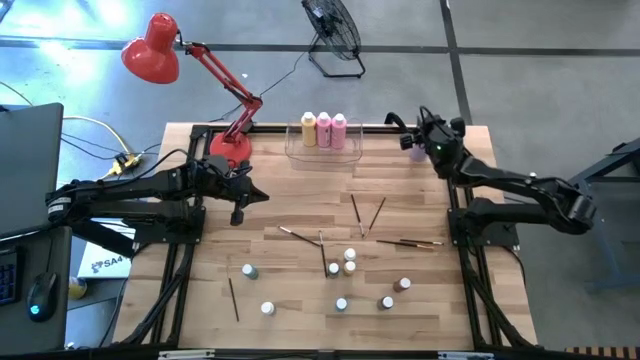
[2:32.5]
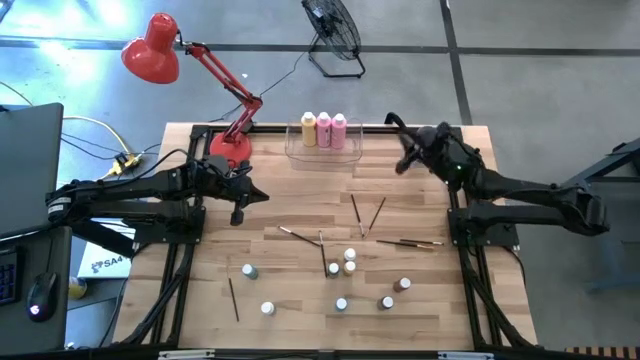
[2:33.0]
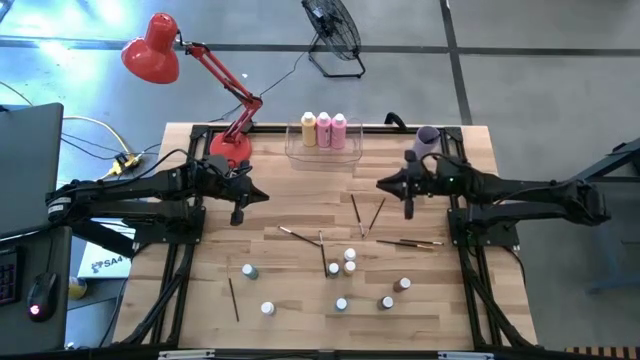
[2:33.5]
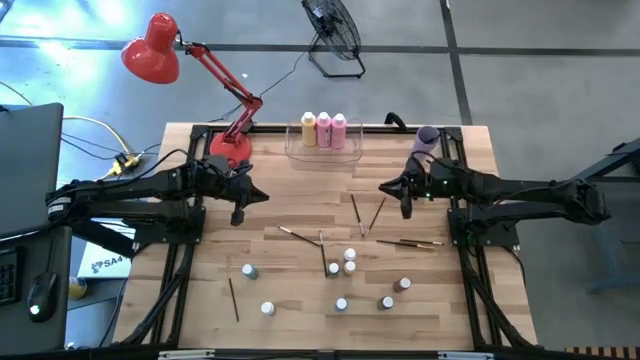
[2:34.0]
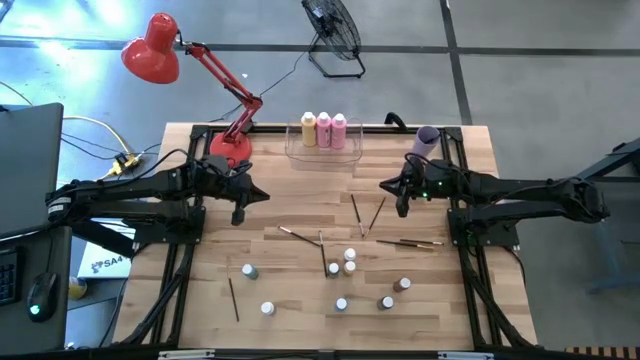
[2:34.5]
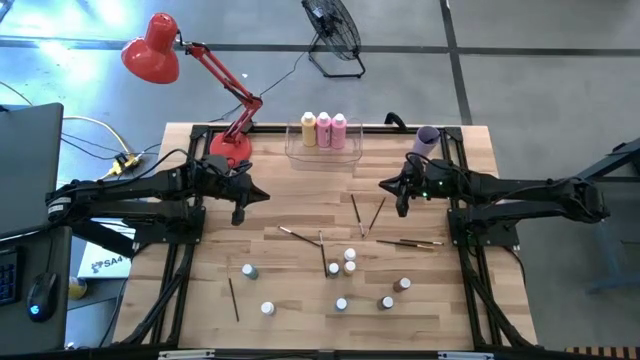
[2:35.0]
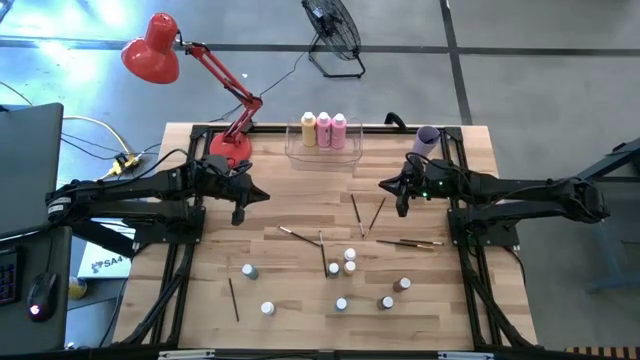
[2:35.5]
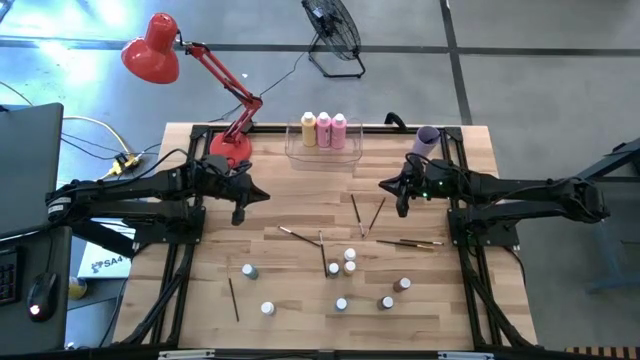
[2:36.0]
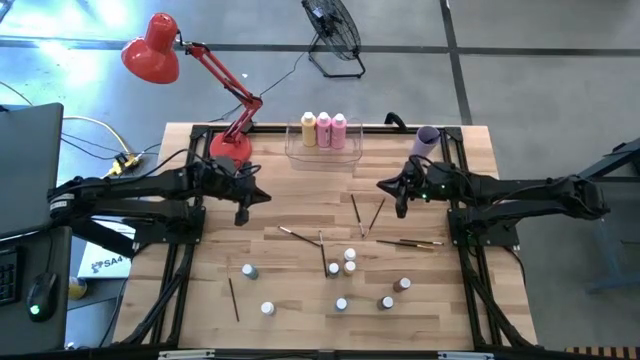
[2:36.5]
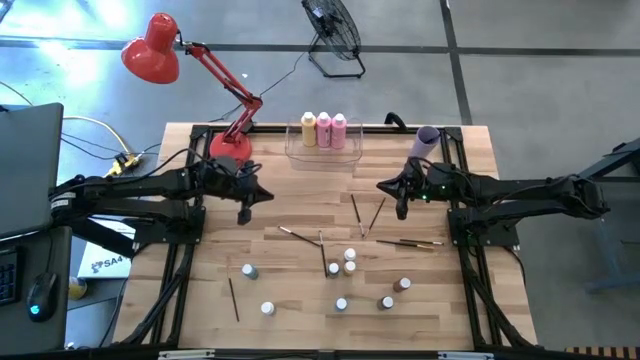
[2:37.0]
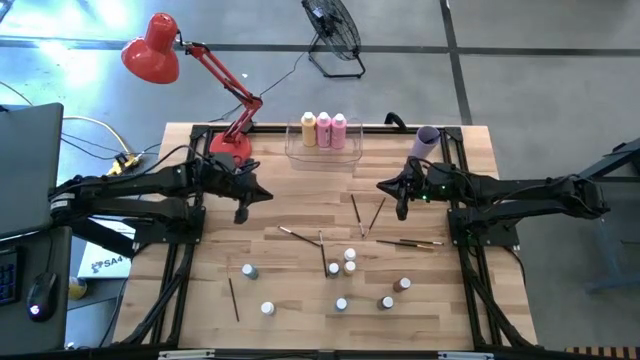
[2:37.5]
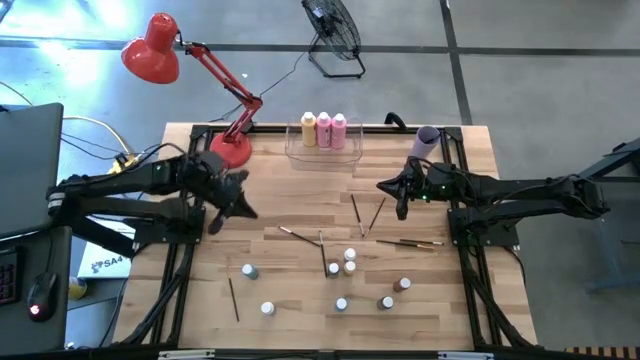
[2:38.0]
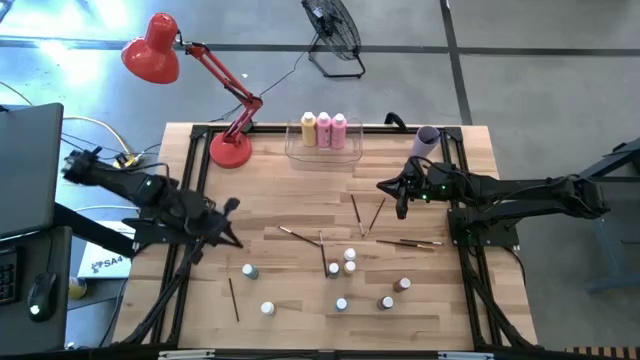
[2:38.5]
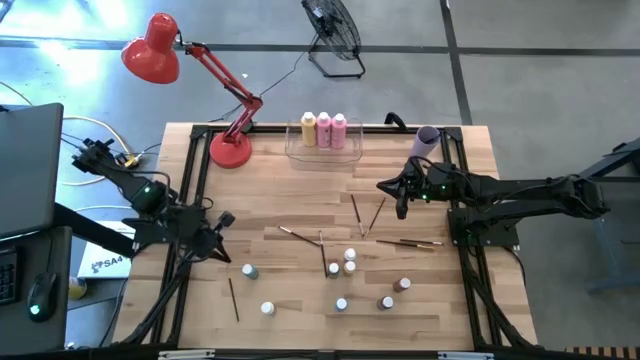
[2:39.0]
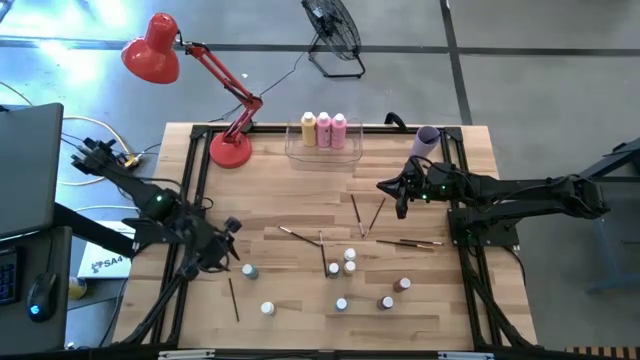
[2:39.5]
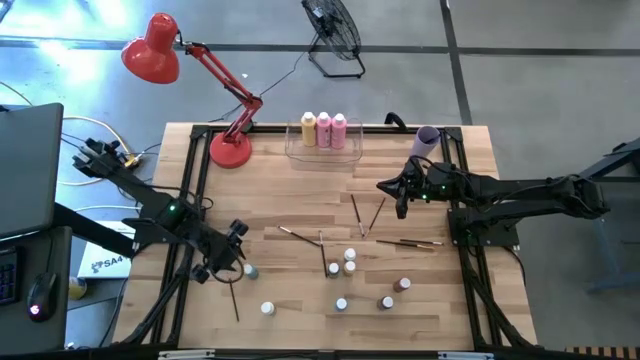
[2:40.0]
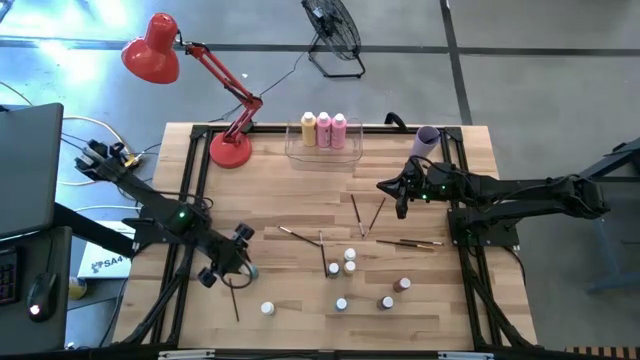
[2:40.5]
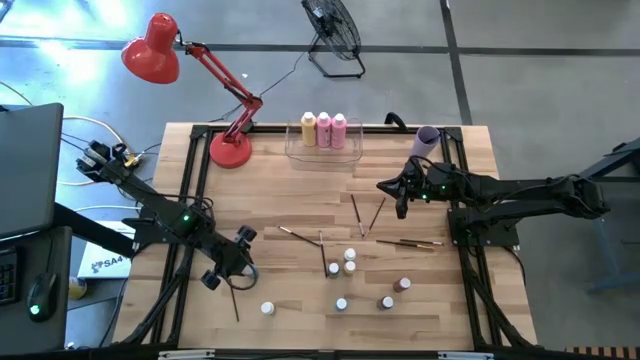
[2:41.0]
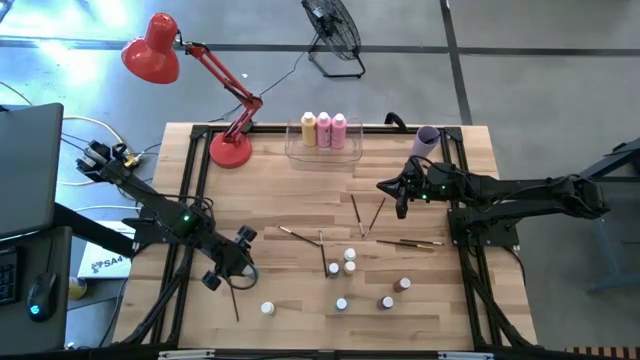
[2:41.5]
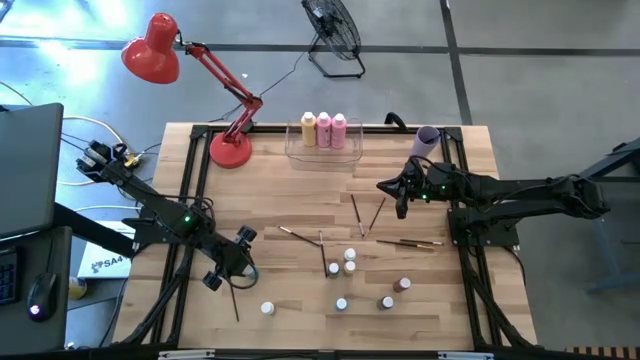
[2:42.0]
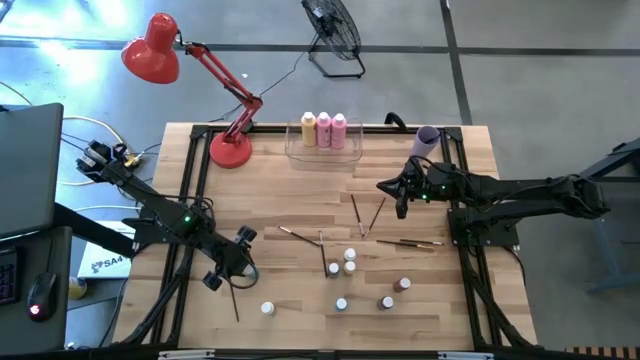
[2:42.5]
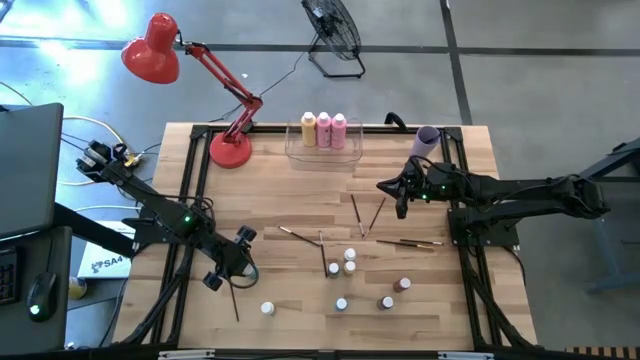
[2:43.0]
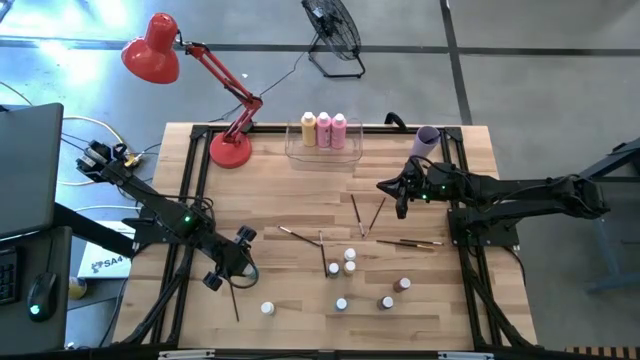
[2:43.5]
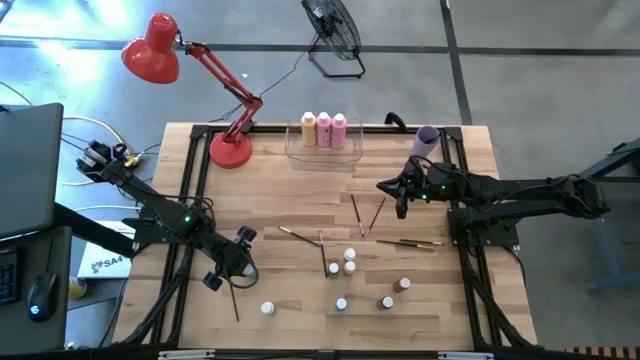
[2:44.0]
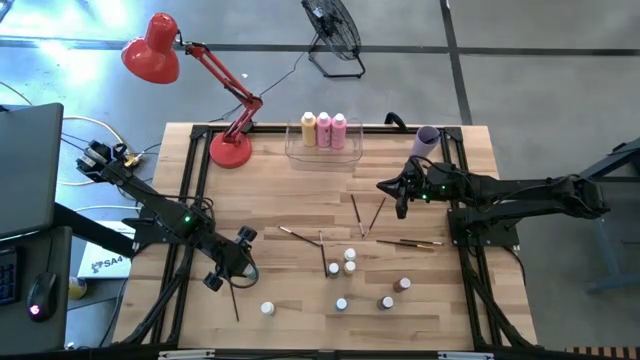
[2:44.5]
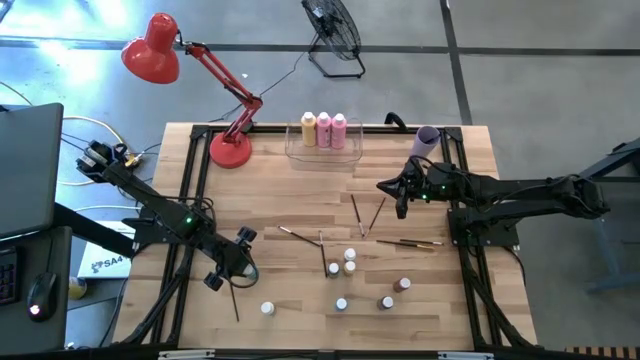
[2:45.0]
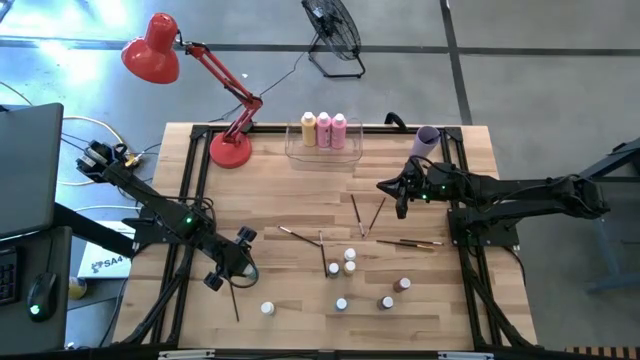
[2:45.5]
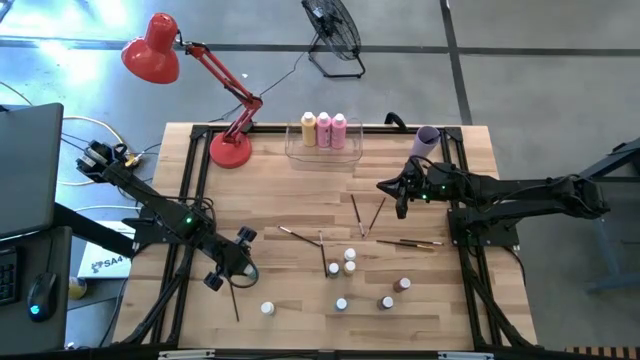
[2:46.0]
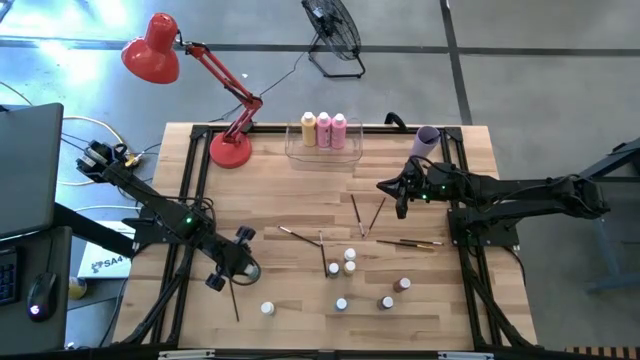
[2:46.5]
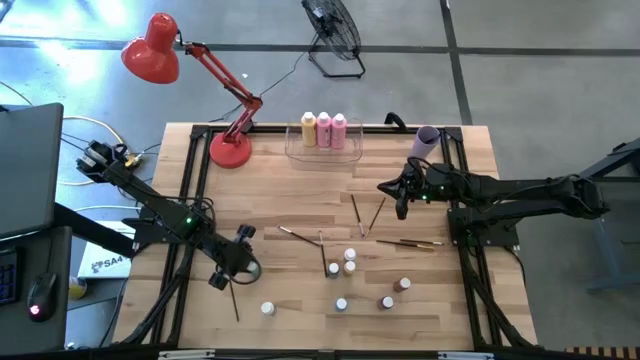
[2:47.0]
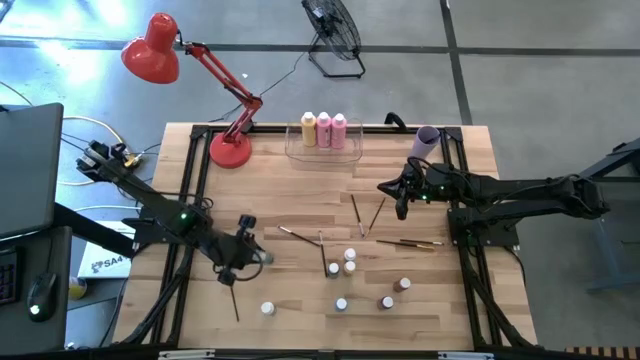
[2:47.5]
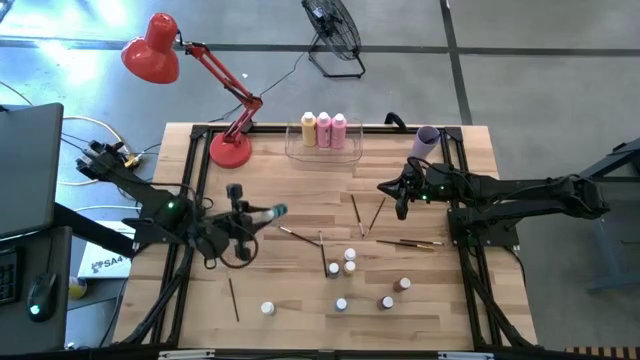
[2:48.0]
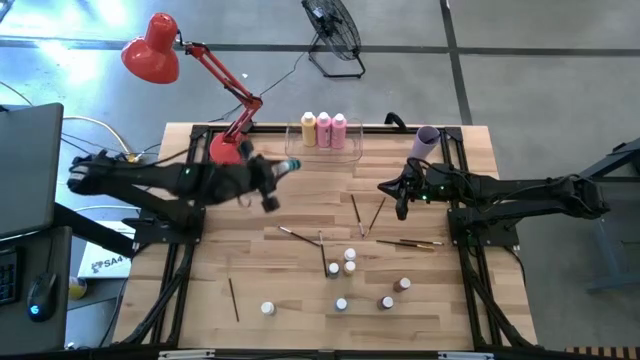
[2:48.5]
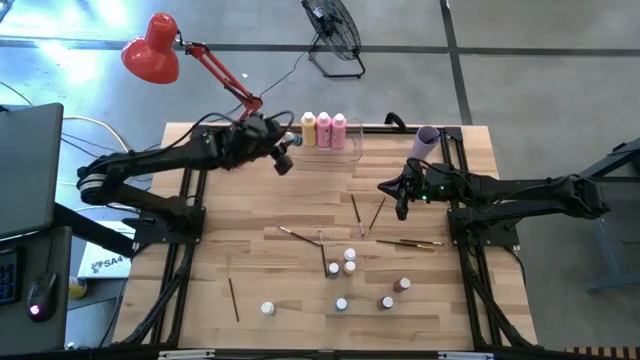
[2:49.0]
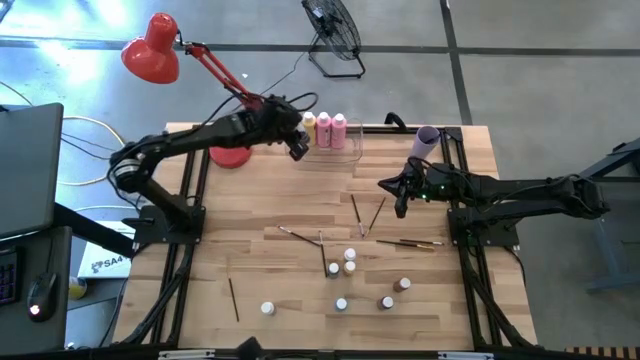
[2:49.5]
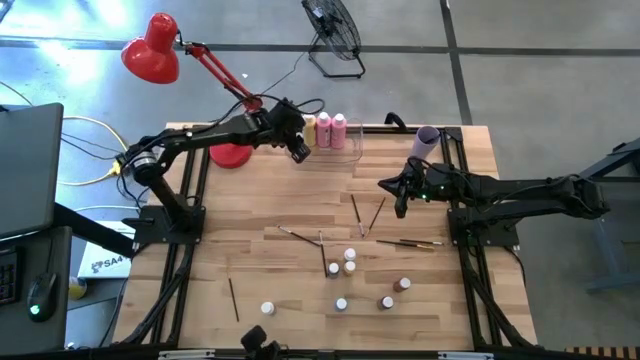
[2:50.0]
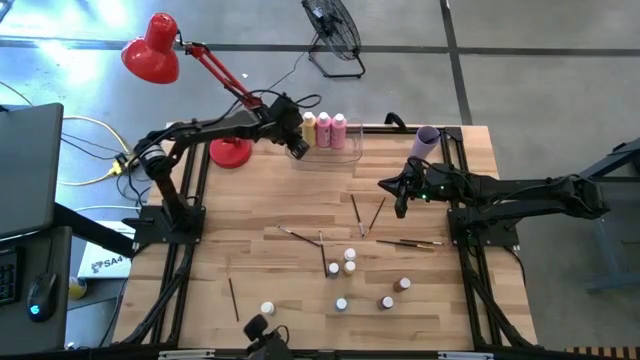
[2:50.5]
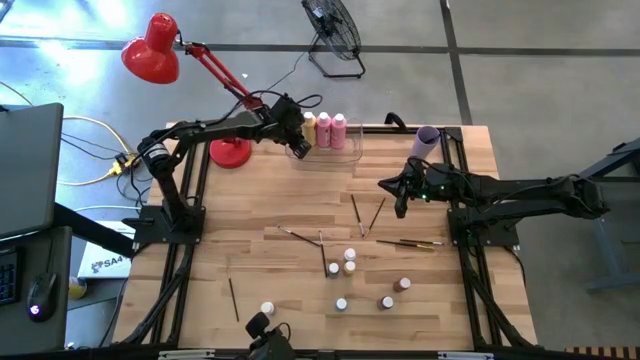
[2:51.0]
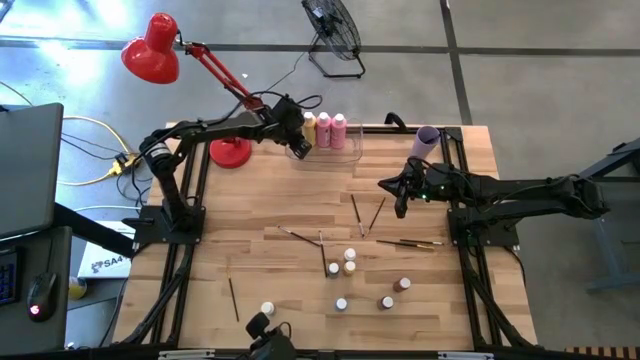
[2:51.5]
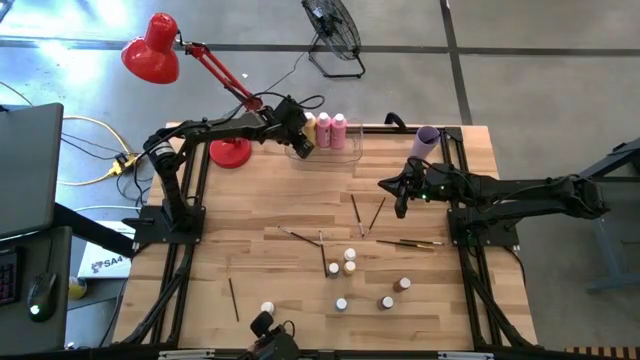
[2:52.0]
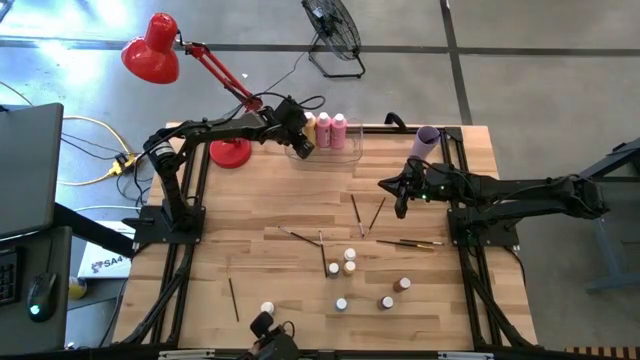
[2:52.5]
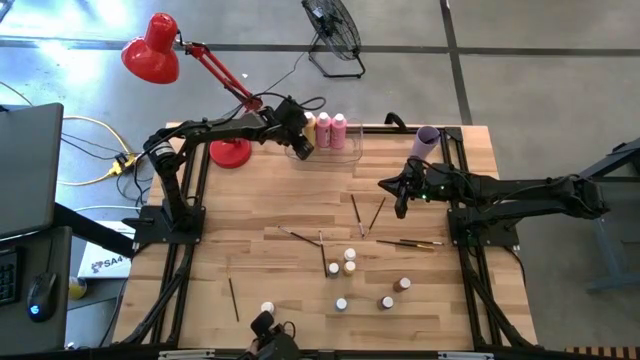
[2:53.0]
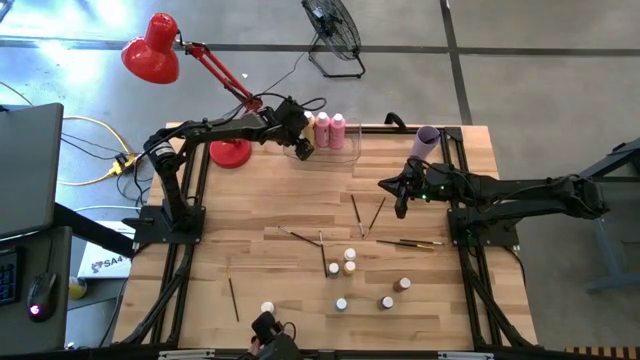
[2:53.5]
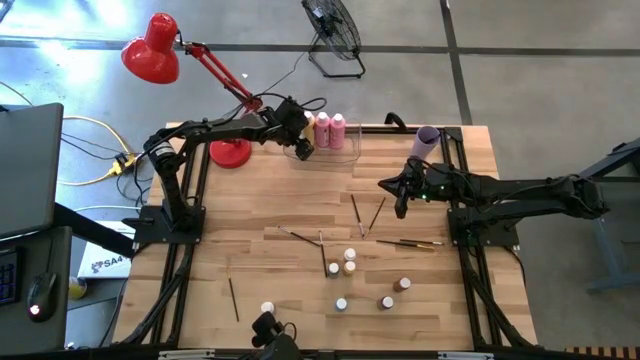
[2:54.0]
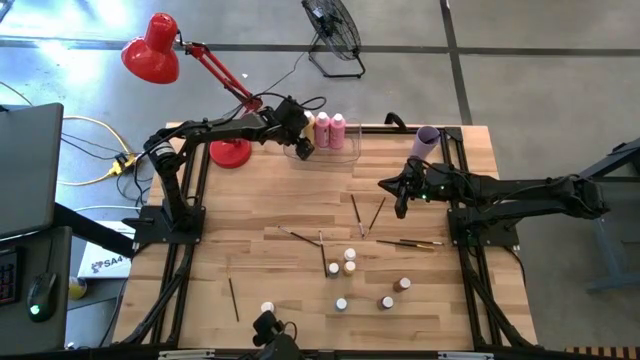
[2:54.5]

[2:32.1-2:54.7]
Task: Pick & Place Paint Supplies
Put the small light blue paint bottle into the transparent bin
